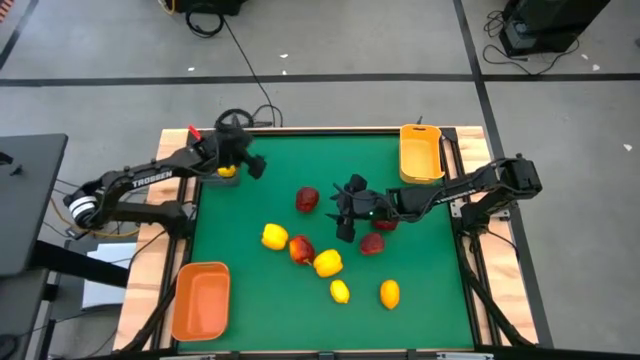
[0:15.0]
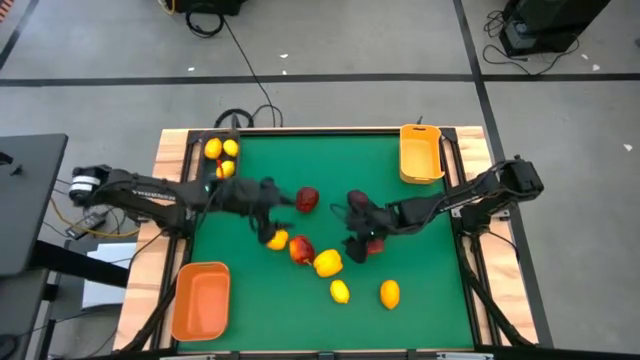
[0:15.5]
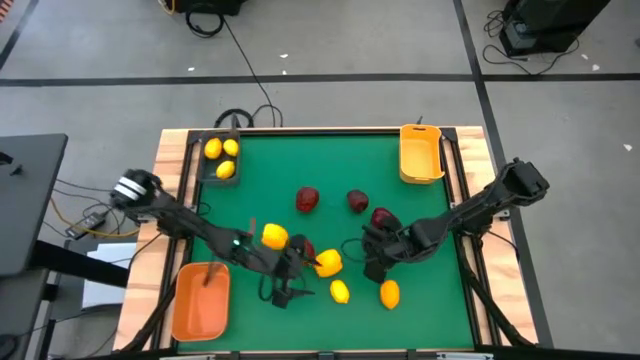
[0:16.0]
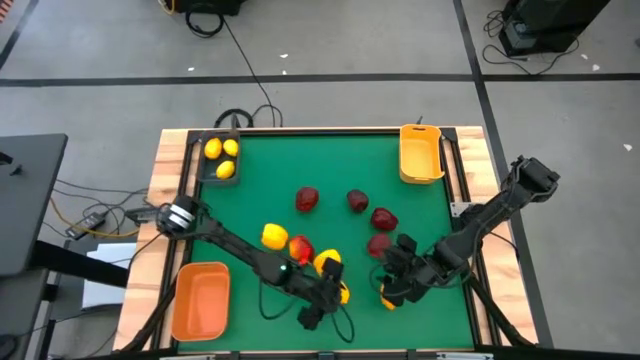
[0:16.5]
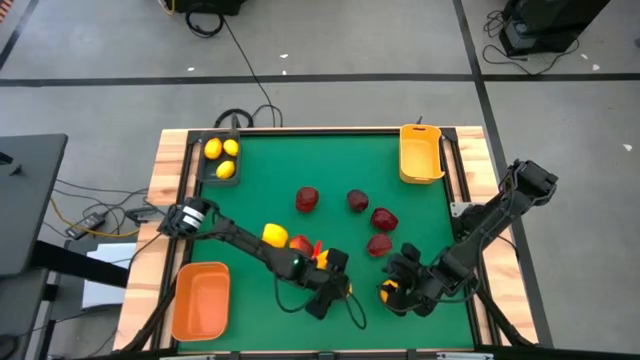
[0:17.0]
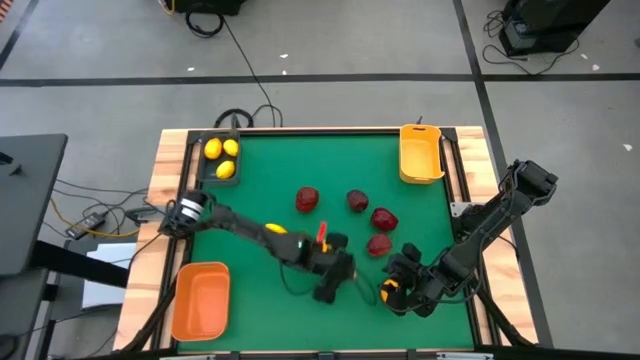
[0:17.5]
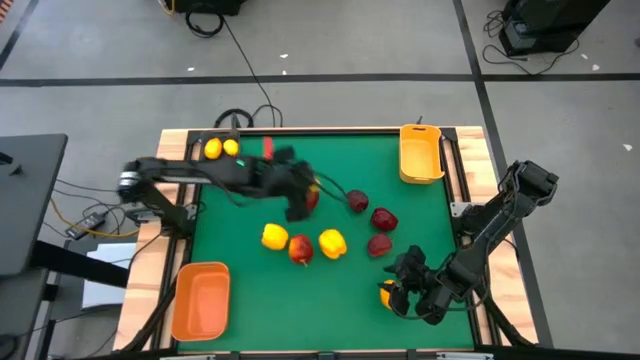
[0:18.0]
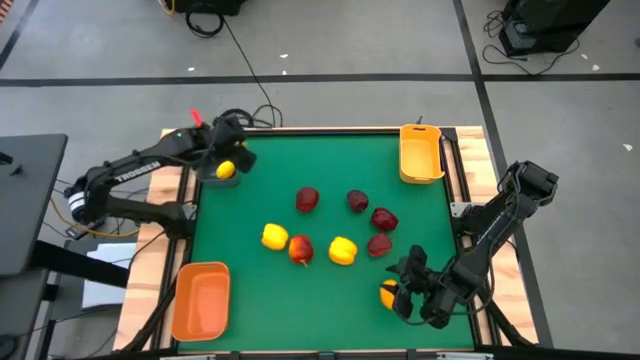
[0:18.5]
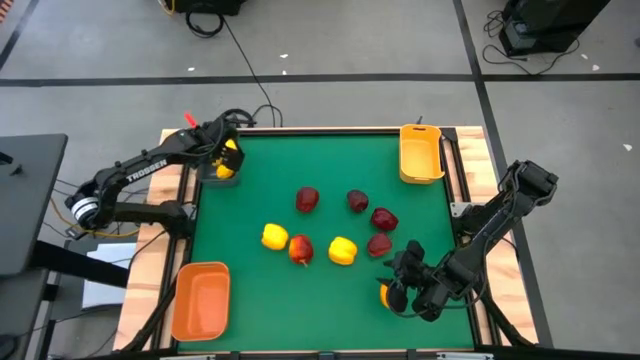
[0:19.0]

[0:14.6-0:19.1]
Task: Sort produce into baskets
Put the lemon into the black bin

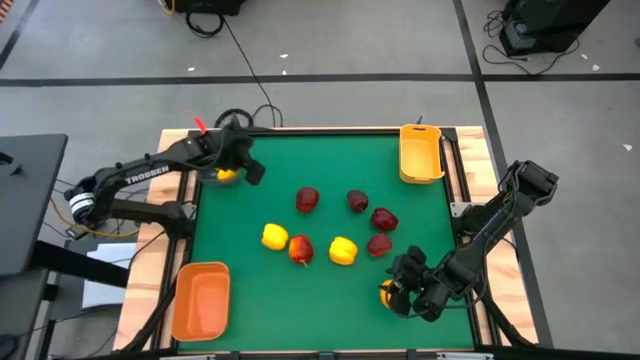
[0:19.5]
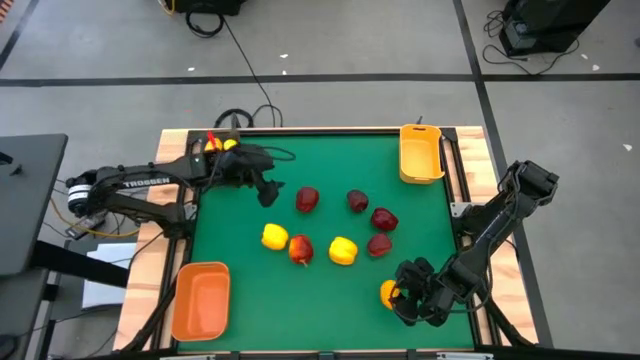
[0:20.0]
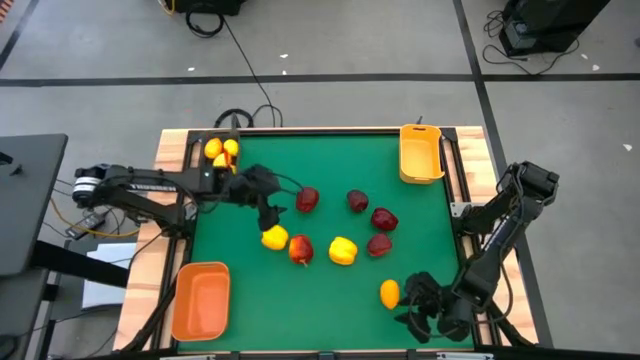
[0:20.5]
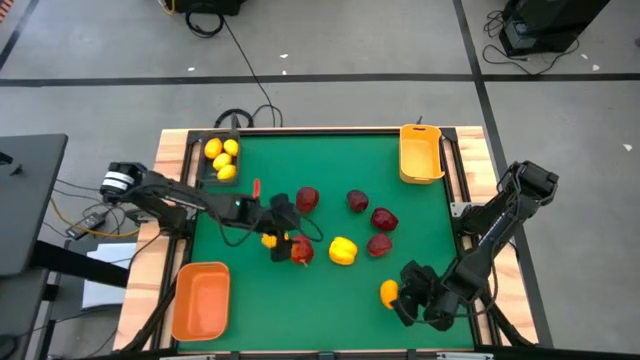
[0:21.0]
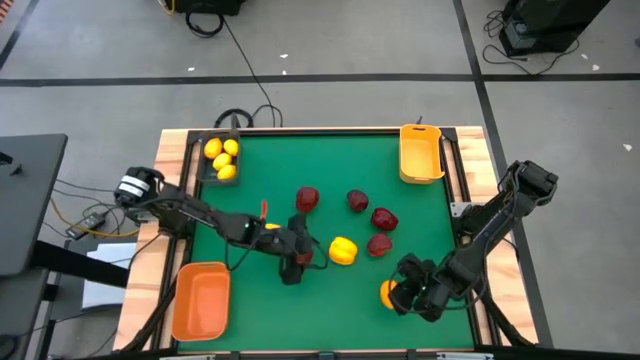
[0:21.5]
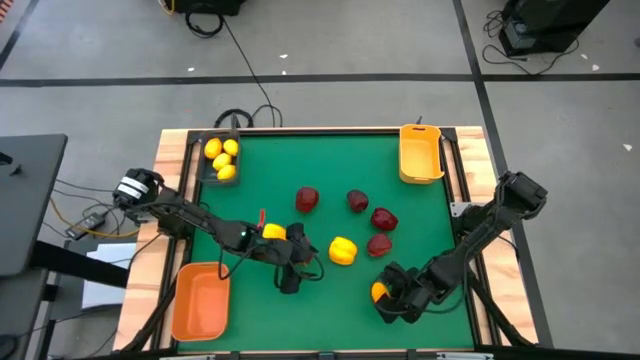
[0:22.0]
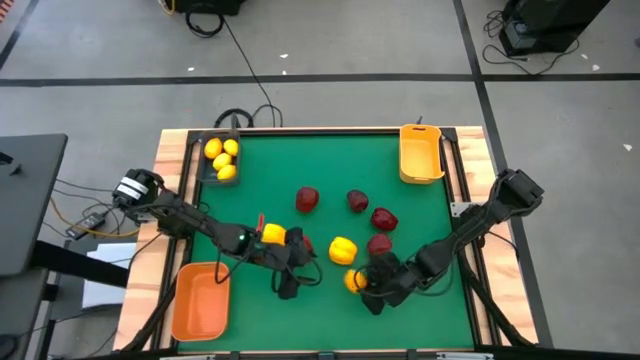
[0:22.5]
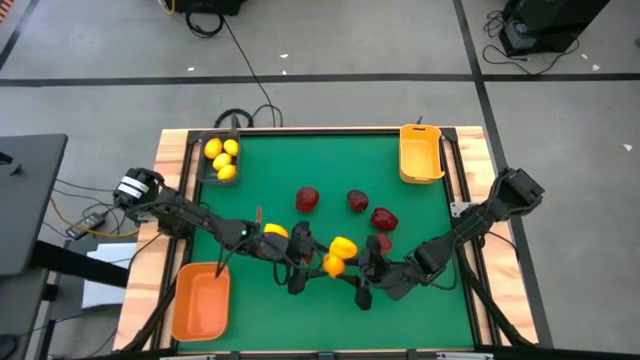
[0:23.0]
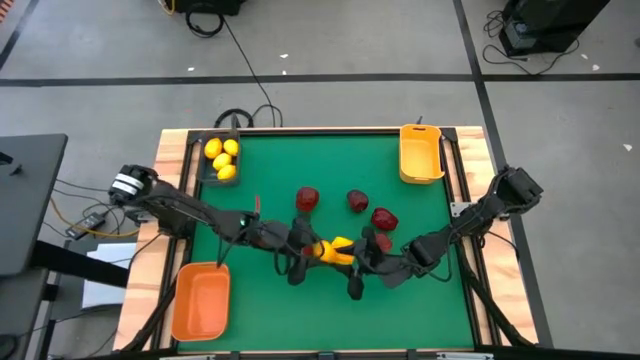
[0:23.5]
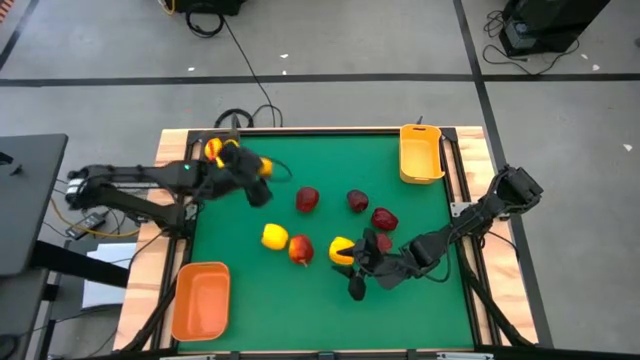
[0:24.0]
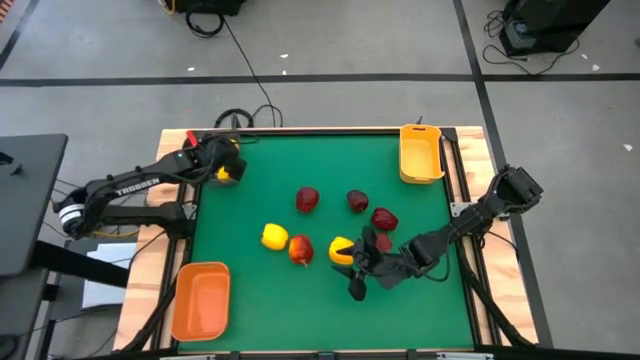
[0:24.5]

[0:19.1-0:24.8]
Put the lemon into the black bin

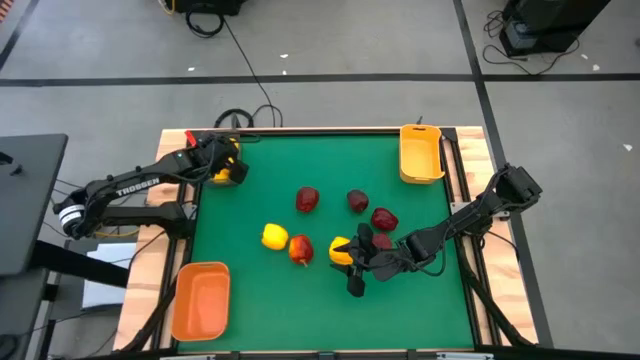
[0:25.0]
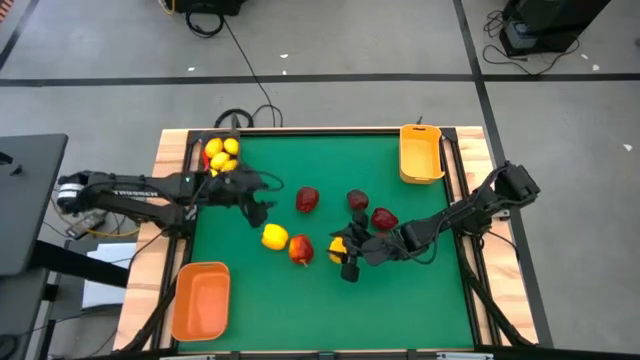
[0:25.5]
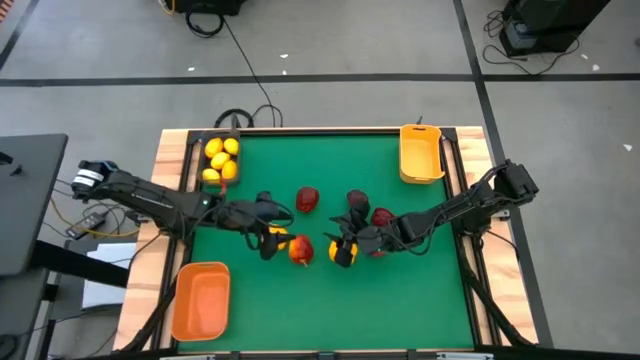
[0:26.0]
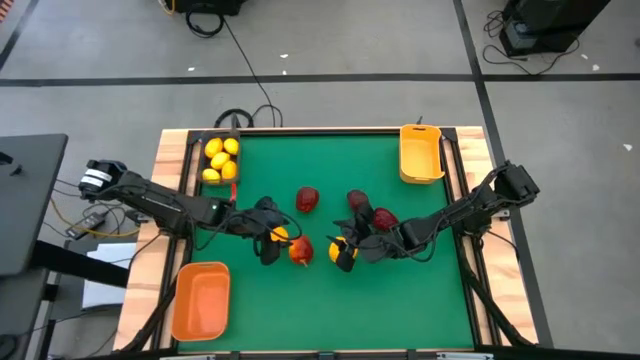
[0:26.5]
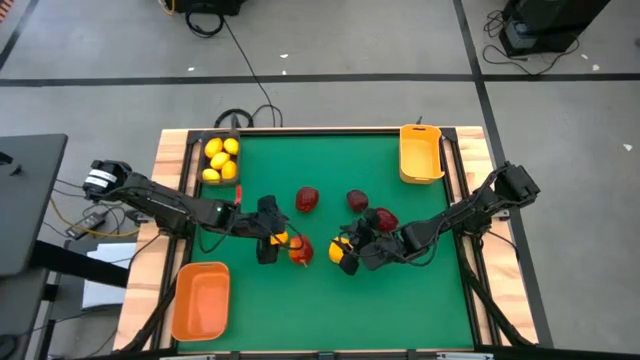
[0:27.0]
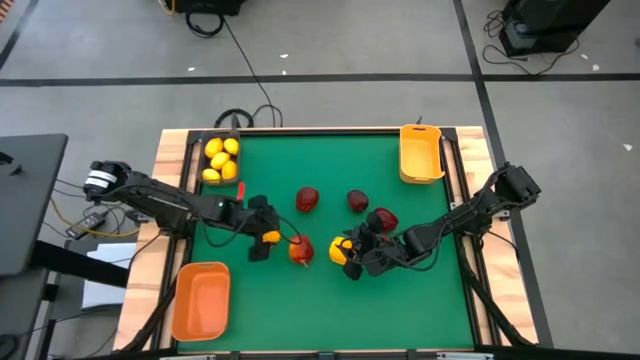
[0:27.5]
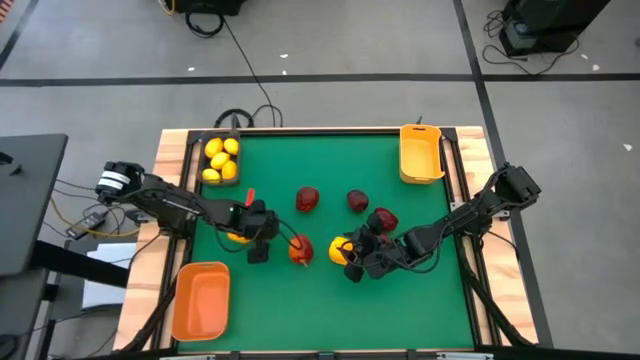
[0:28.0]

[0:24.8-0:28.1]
Put the yellow bell pepper into the orange bin

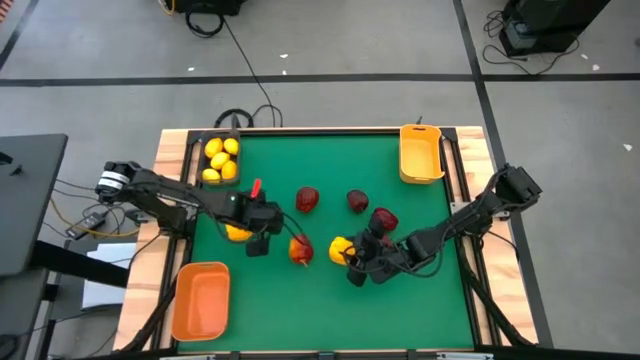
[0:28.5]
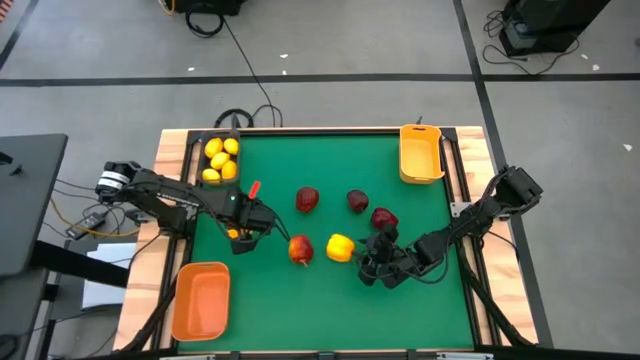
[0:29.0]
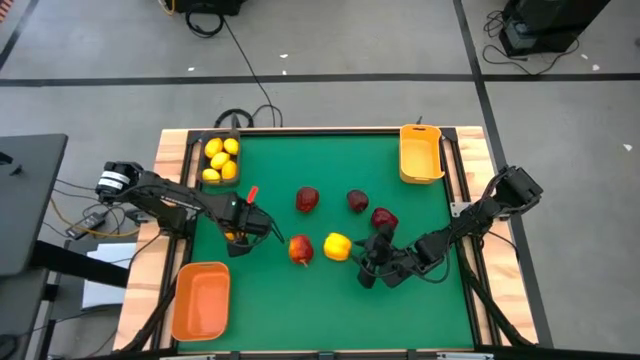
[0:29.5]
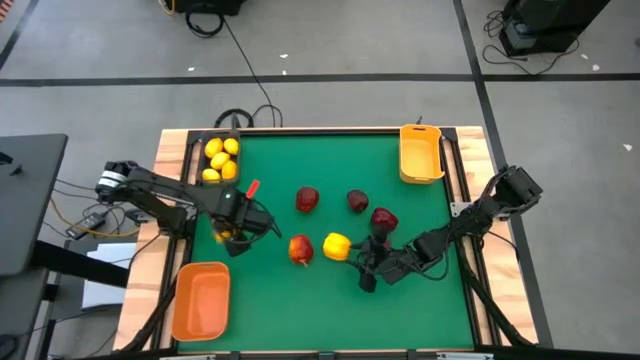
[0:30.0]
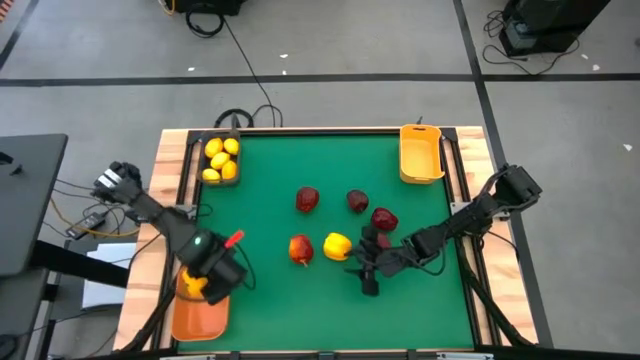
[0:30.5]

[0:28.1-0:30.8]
Put the yellow bell pepper into the orange bin

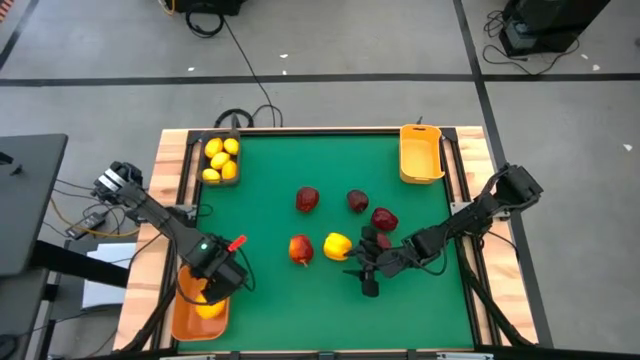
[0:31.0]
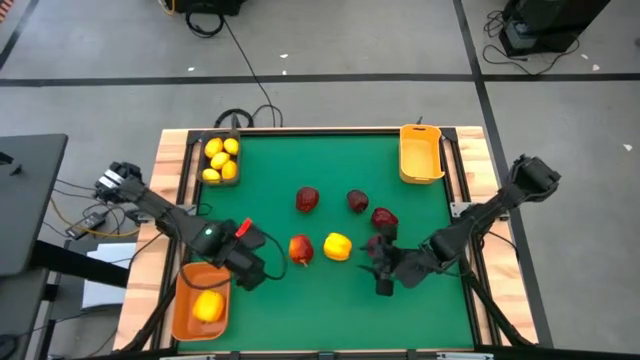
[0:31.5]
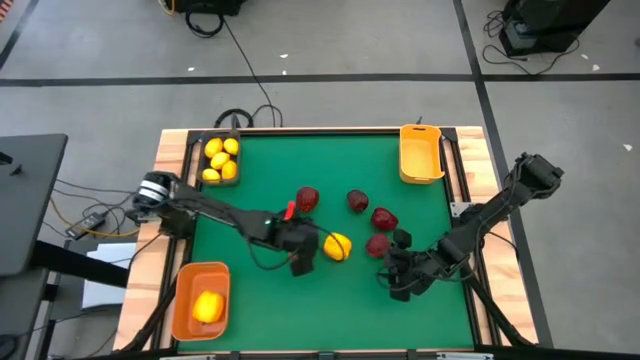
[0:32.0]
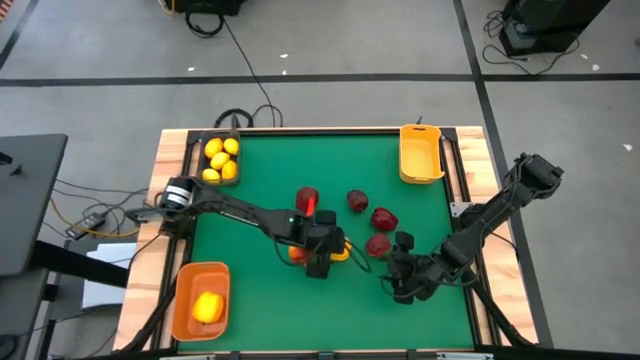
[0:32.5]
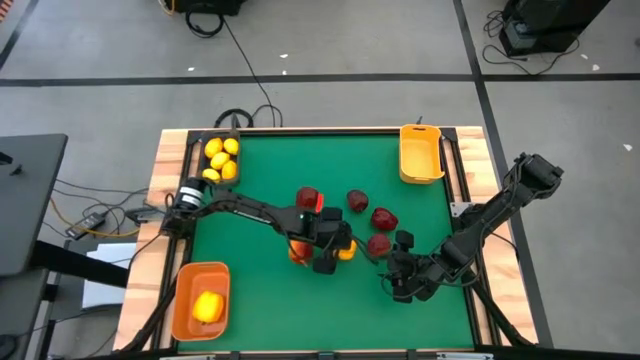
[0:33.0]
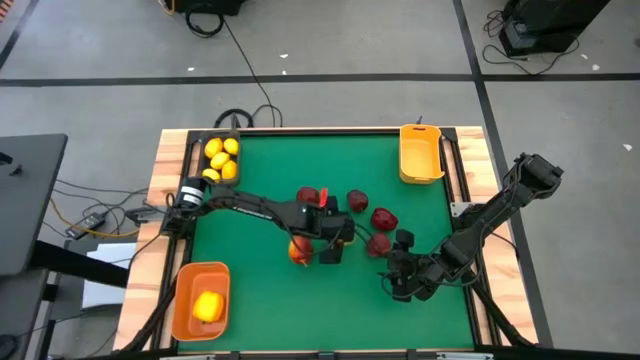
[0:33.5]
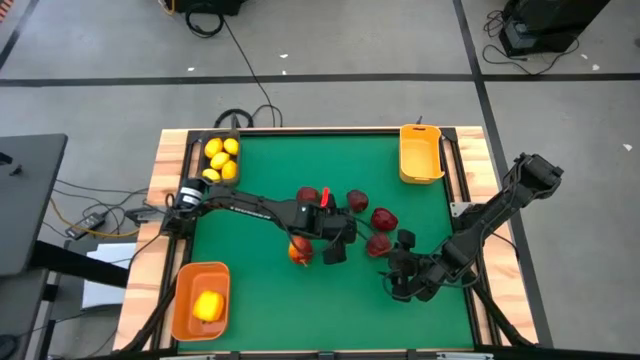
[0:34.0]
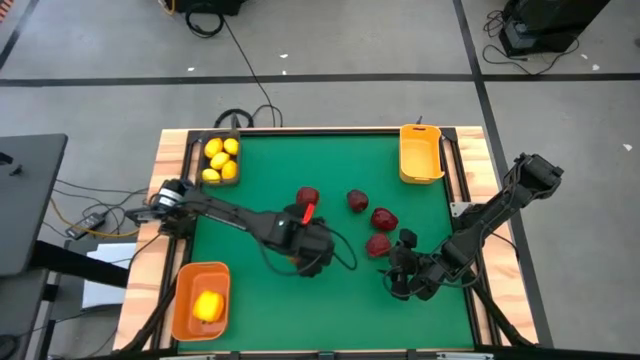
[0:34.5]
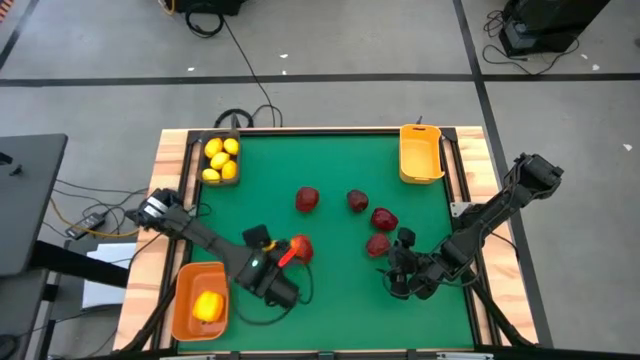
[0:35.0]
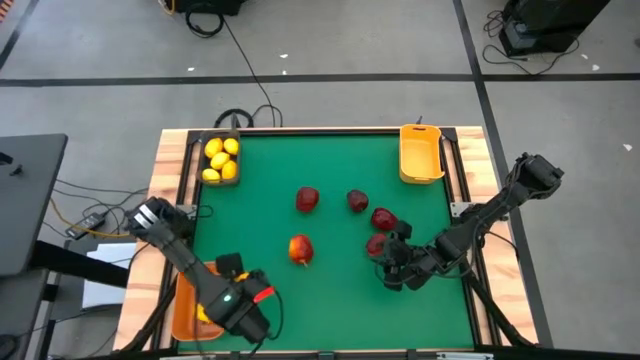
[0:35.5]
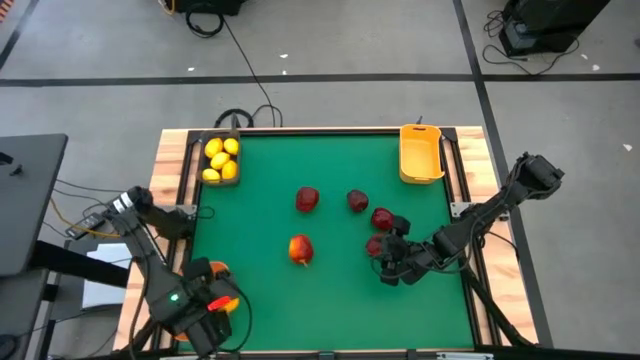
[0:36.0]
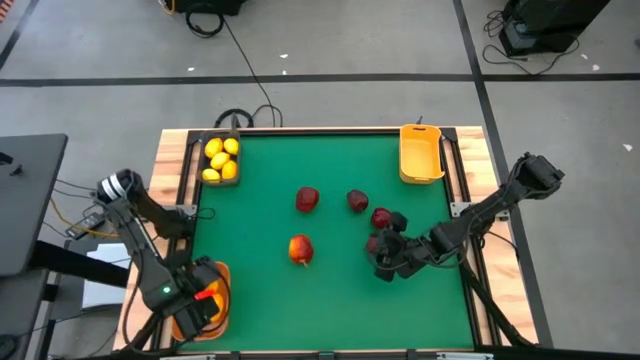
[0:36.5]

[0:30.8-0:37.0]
Put the yellow bell pepper into the orange bin
